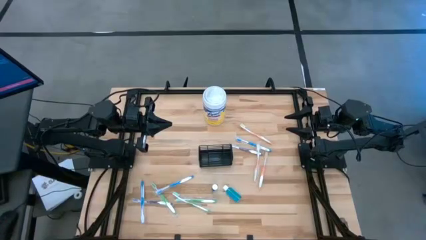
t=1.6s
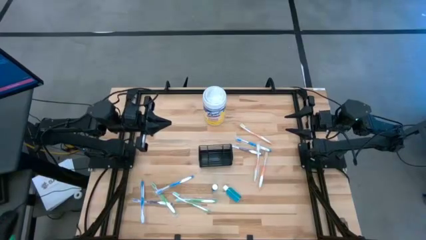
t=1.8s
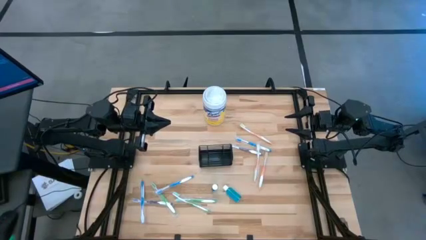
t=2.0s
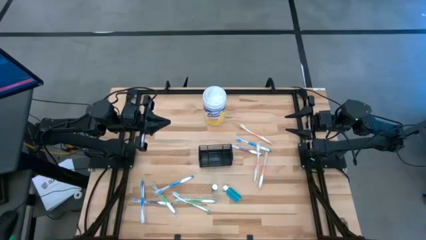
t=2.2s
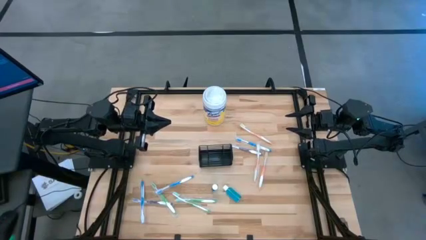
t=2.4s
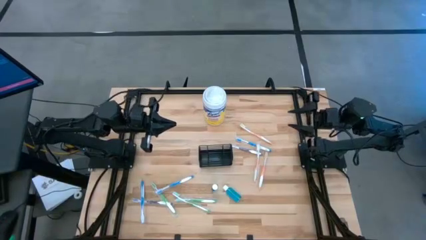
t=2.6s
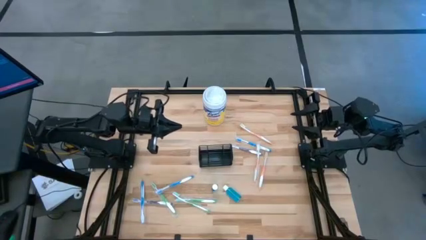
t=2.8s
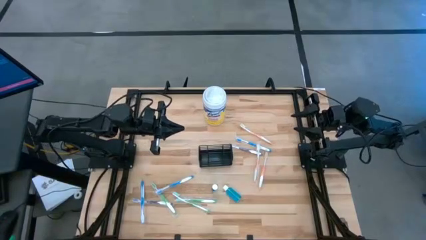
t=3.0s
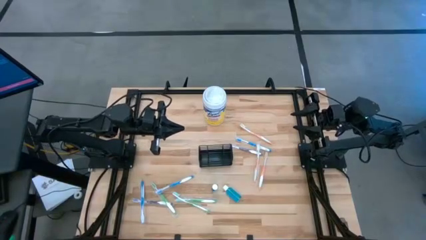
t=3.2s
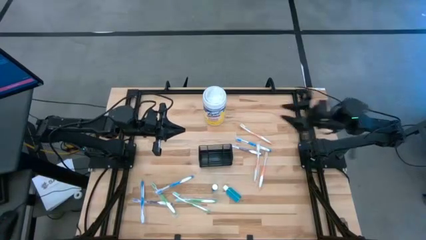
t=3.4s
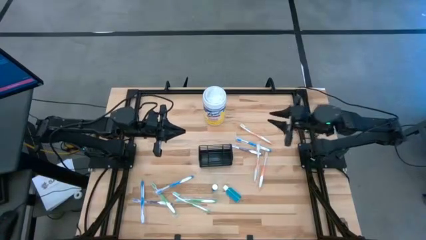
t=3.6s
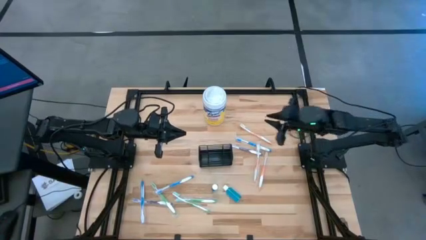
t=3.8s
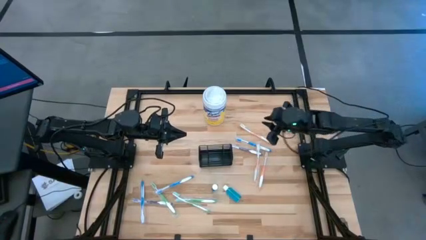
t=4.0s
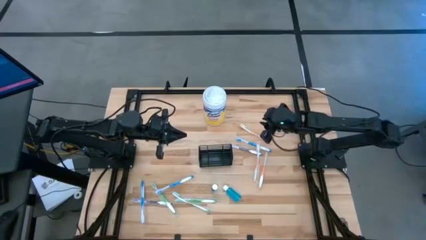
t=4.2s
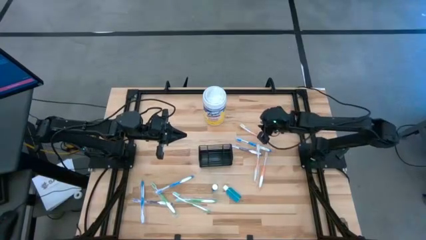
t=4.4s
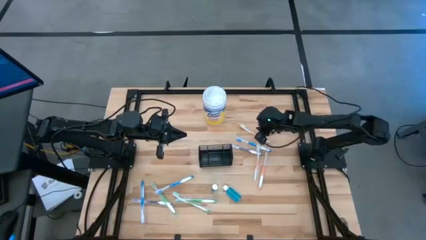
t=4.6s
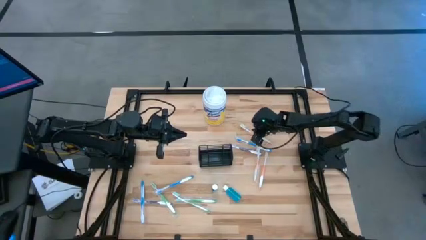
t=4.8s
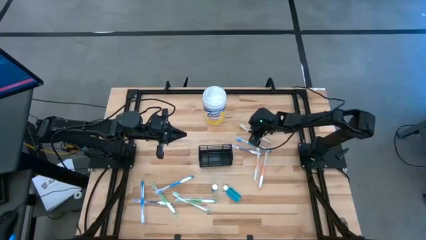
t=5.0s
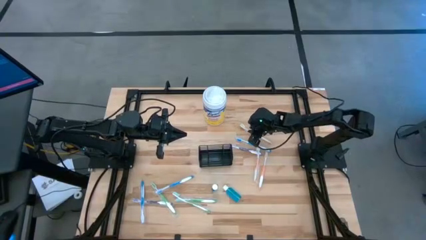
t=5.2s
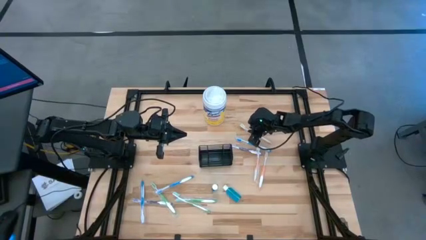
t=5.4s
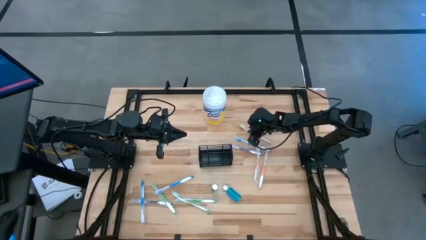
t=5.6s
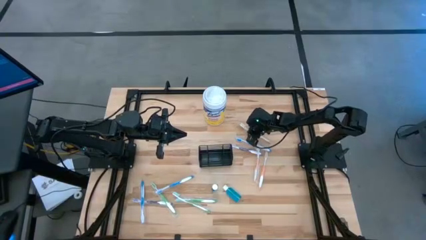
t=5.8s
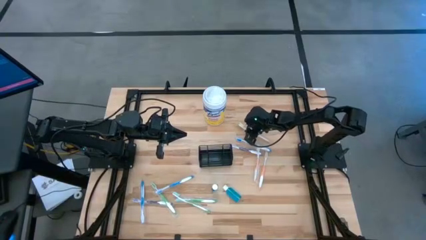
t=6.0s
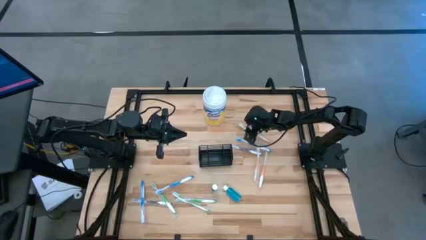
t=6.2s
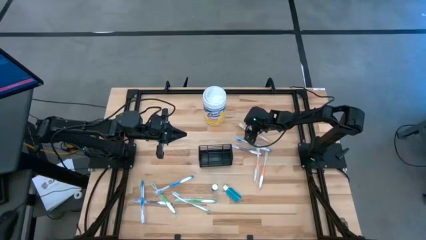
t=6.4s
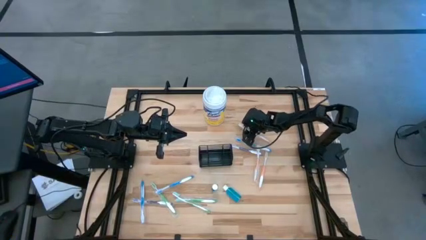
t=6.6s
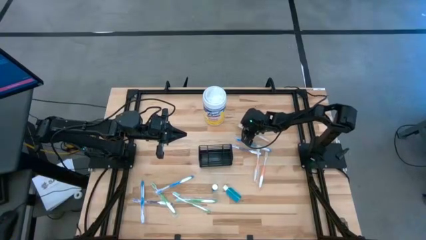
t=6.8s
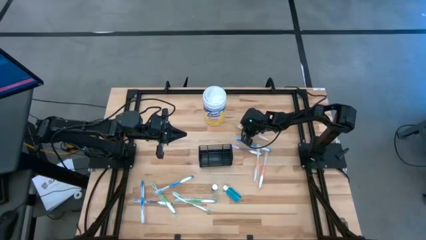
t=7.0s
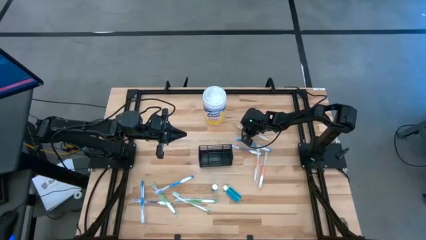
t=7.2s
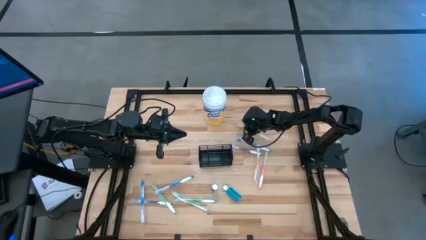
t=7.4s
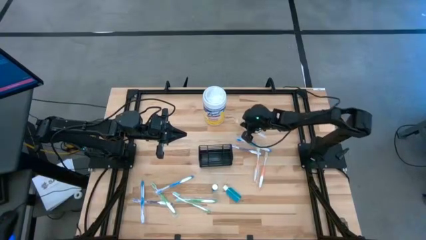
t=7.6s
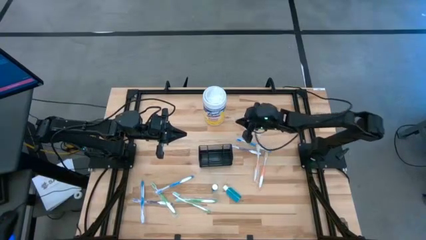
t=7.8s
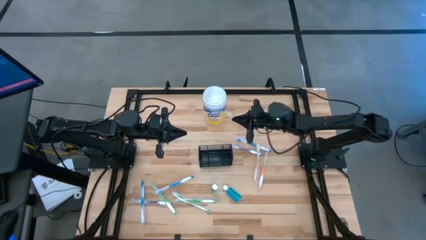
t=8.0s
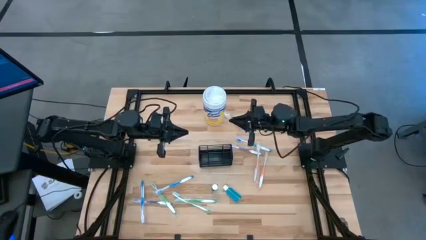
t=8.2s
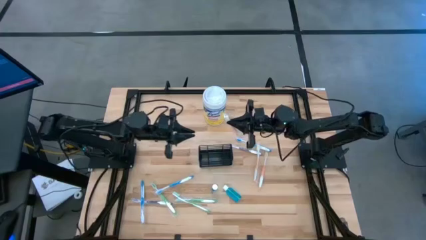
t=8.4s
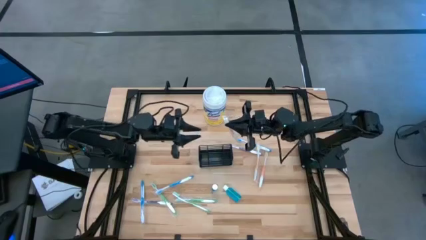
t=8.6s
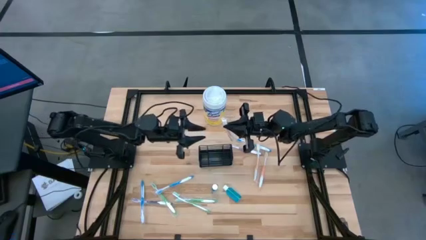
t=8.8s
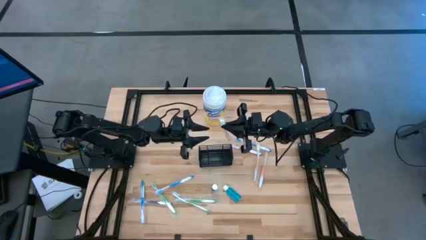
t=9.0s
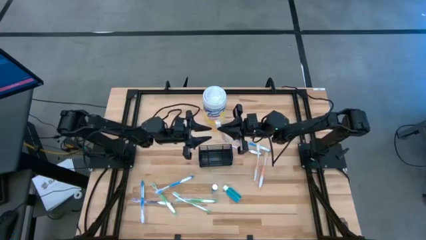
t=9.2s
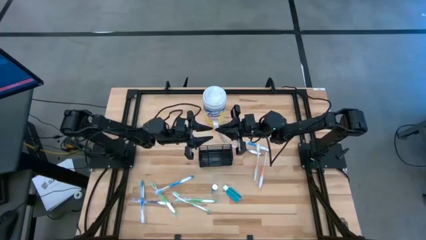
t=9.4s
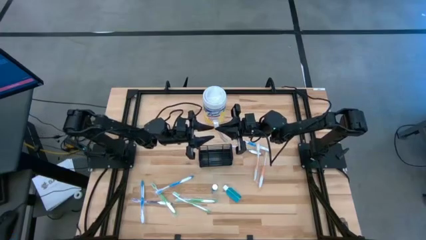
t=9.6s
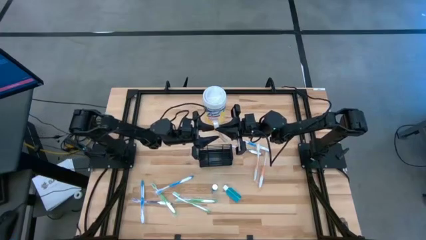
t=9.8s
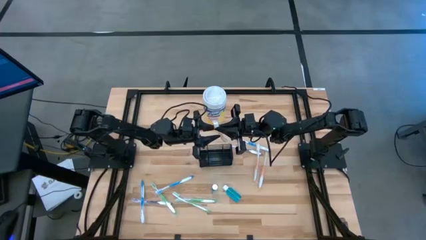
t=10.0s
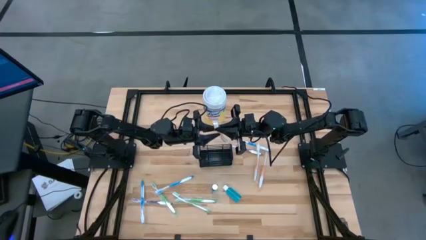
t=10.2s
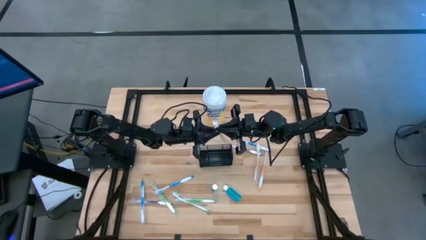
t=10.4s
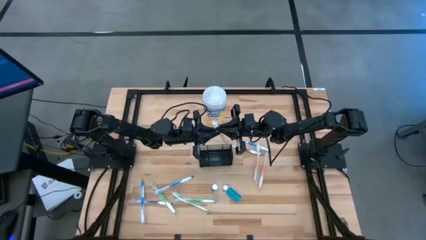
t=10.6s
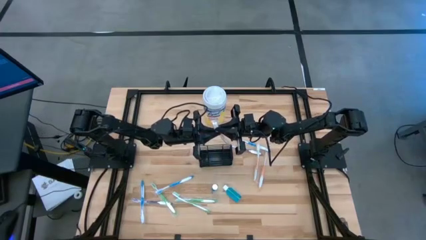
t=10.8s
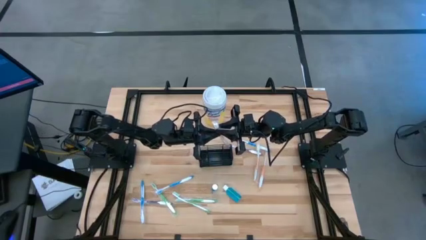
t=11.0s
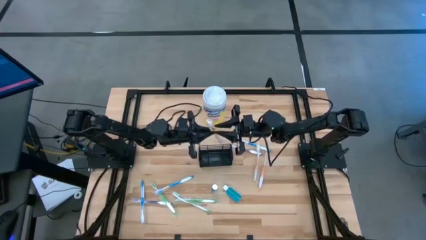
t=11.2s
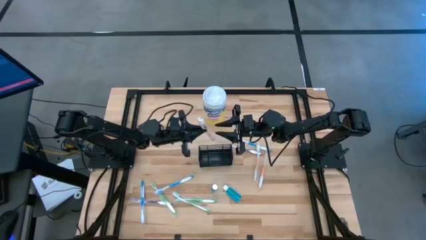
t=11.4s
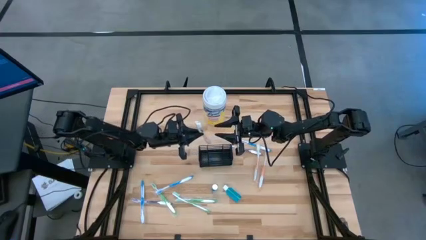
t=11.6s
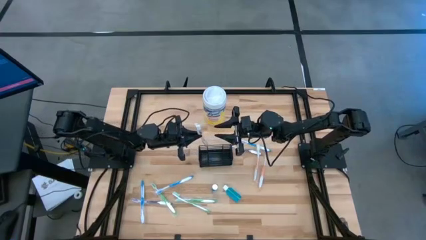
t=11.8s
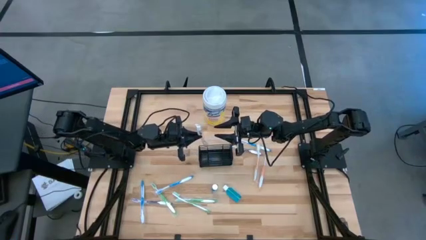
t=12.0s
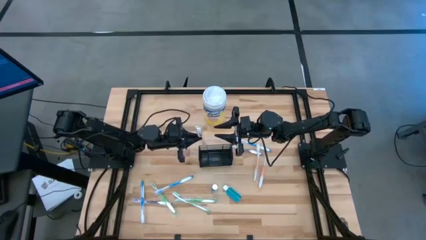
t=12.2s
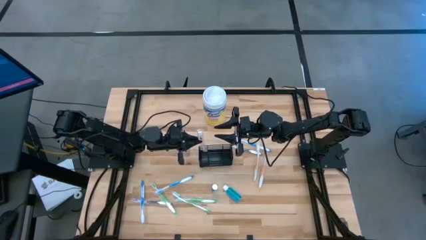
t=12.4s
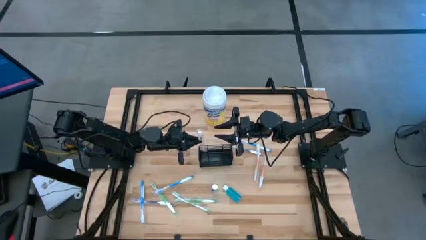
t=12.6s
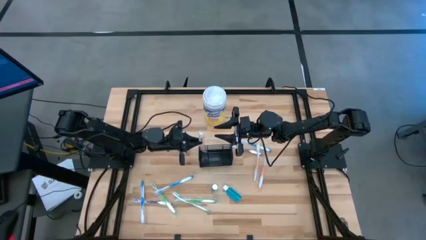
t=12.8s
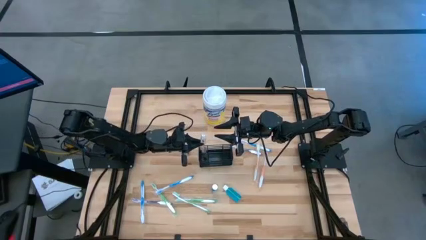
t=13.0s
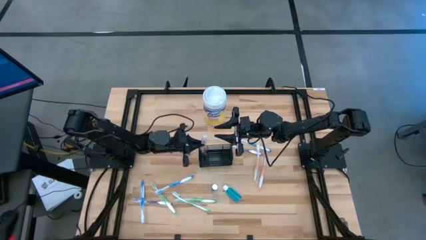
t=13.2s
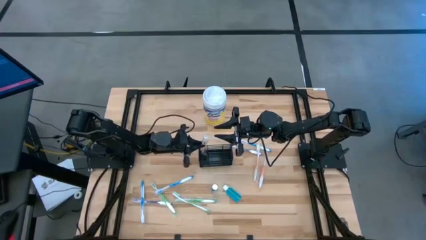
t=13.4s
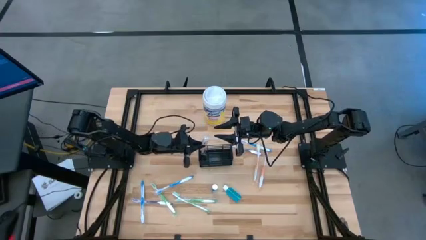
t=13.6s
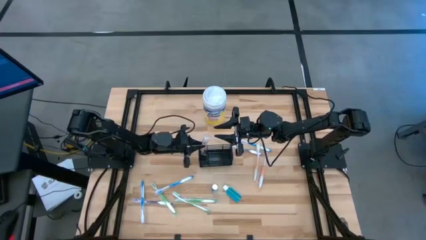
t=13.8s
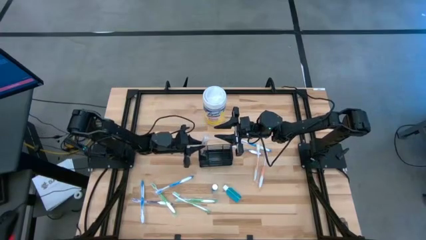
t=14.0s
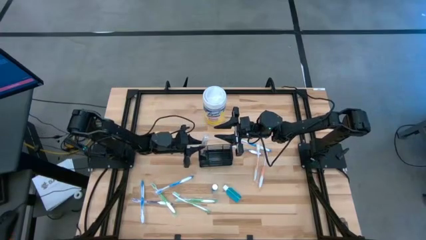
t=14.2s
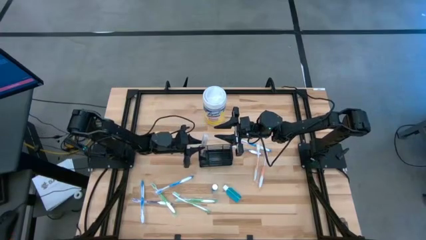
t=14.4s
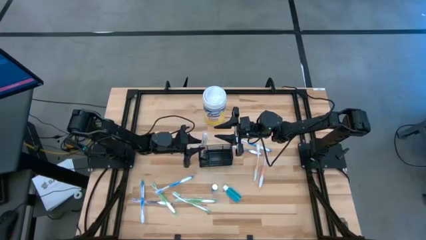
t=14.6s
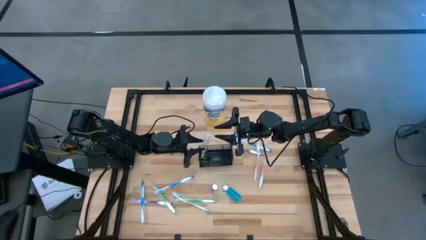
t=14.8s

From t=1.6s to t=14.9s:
Task: Pick & Place toothbrushing station
Put the top orange toothbrush into the mesh organizer
